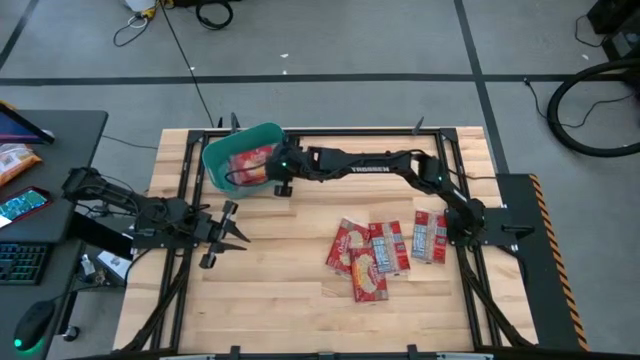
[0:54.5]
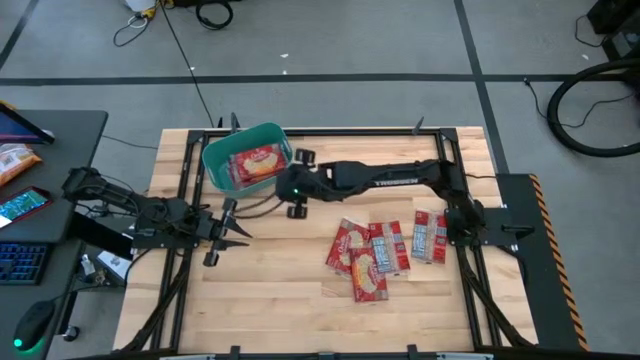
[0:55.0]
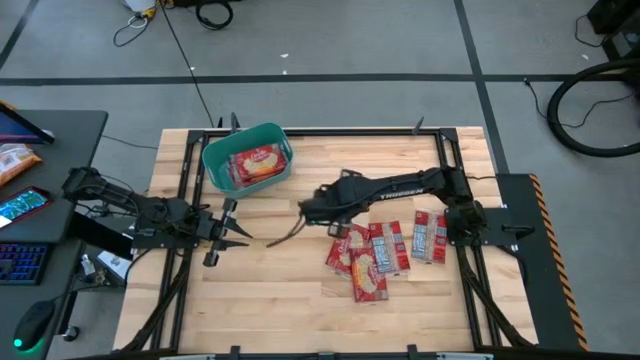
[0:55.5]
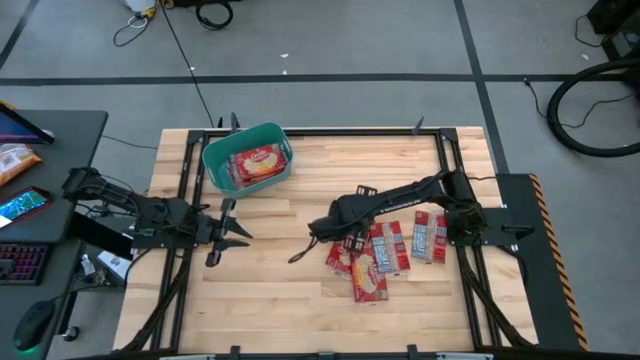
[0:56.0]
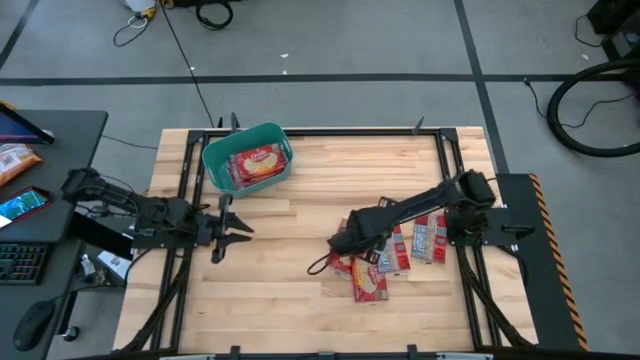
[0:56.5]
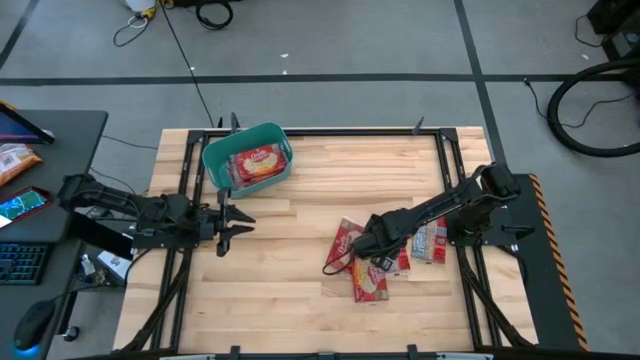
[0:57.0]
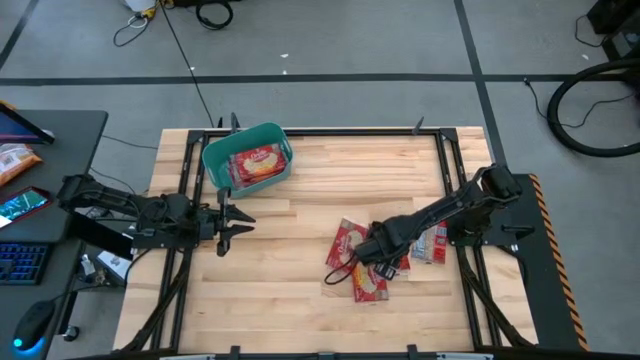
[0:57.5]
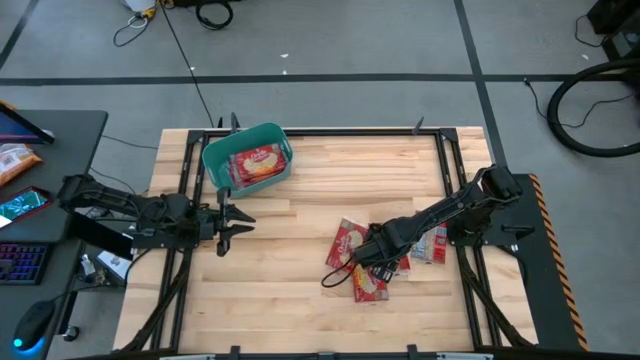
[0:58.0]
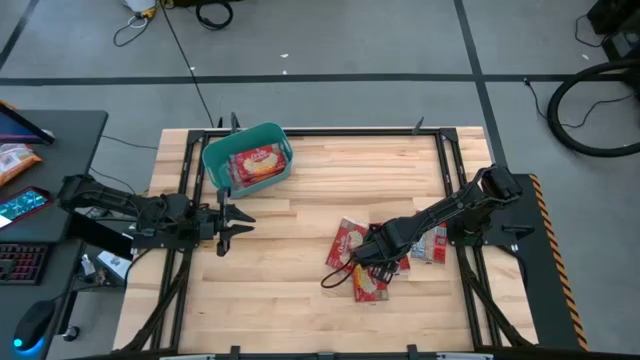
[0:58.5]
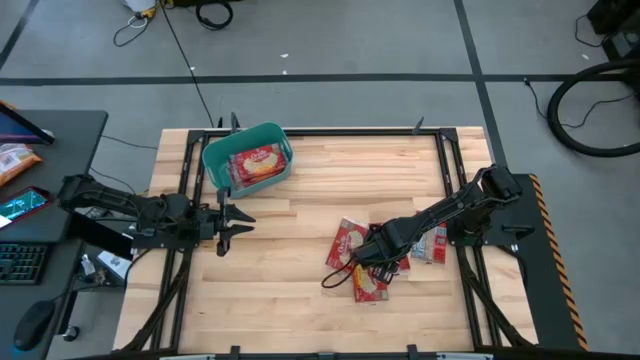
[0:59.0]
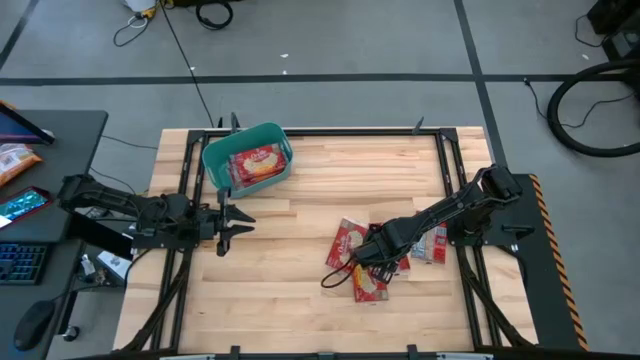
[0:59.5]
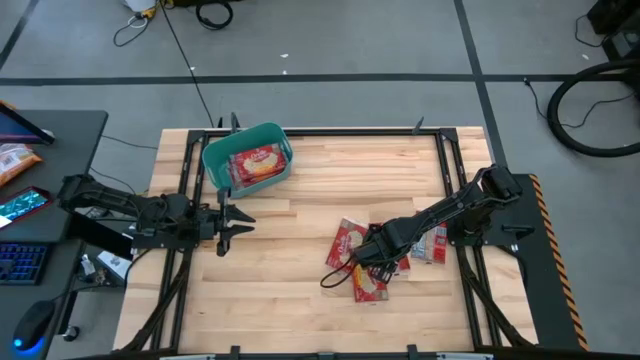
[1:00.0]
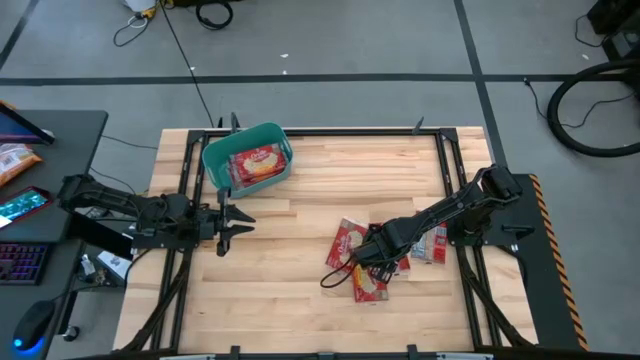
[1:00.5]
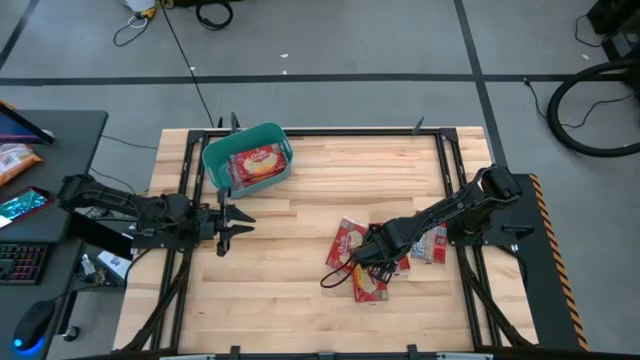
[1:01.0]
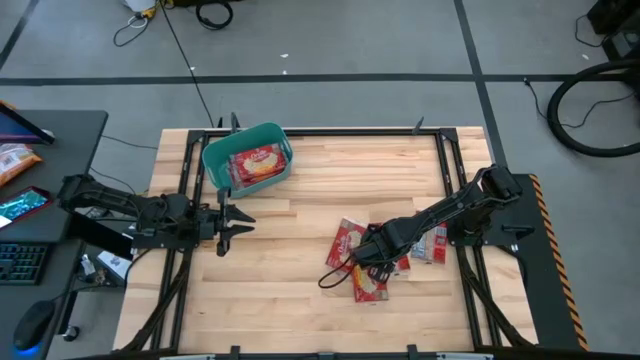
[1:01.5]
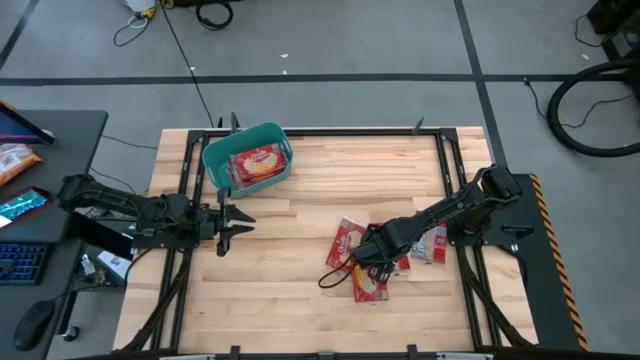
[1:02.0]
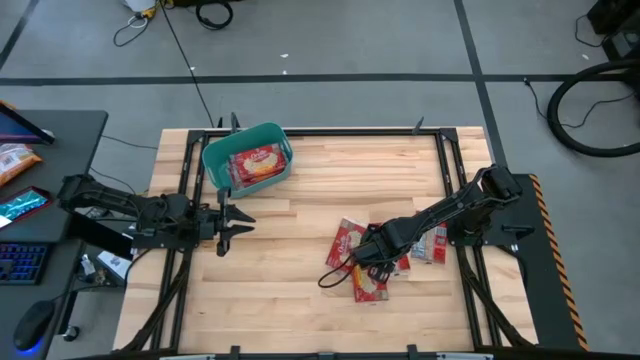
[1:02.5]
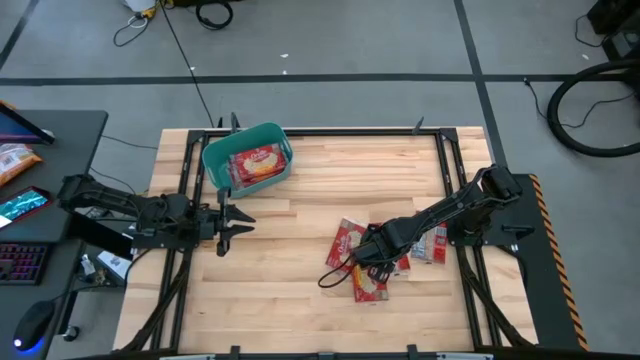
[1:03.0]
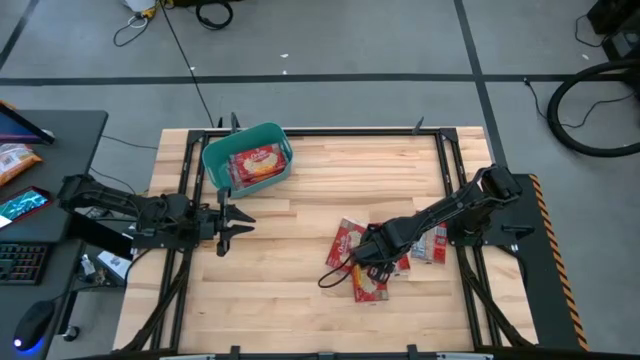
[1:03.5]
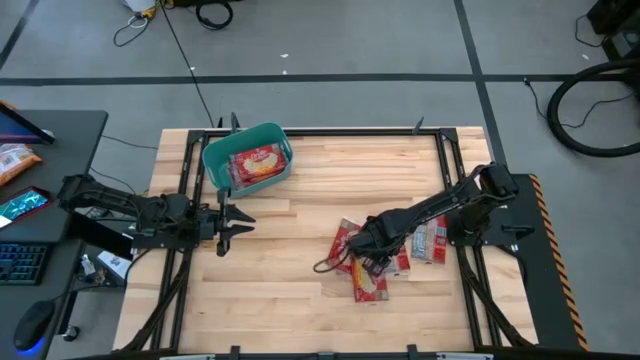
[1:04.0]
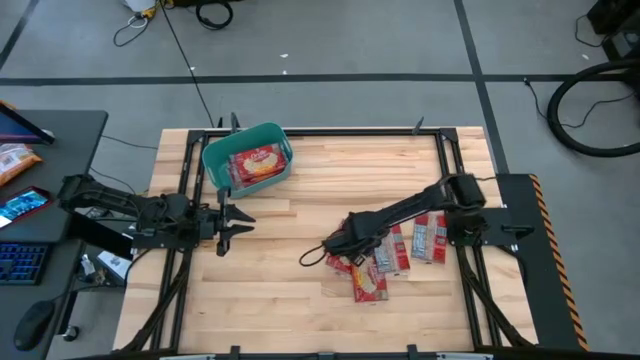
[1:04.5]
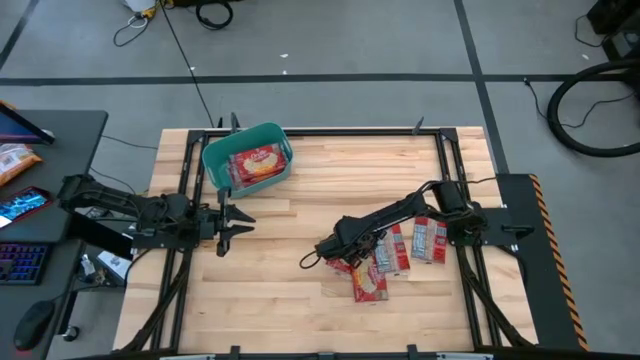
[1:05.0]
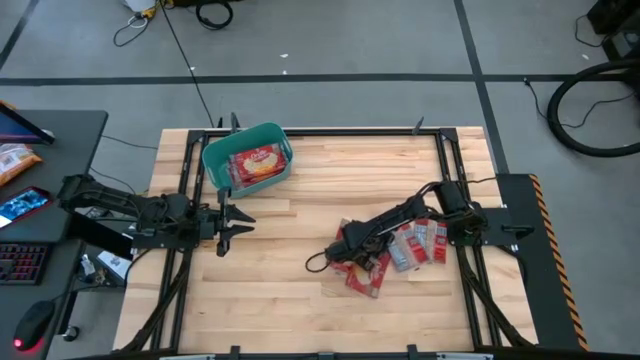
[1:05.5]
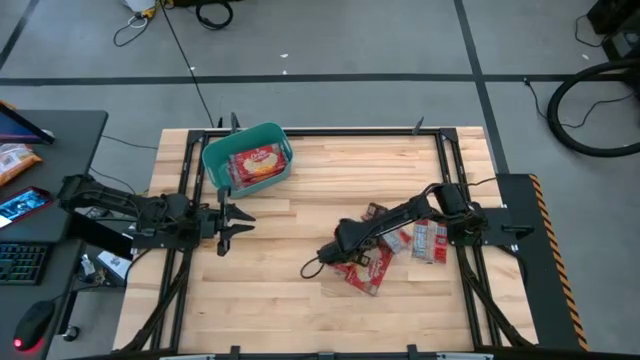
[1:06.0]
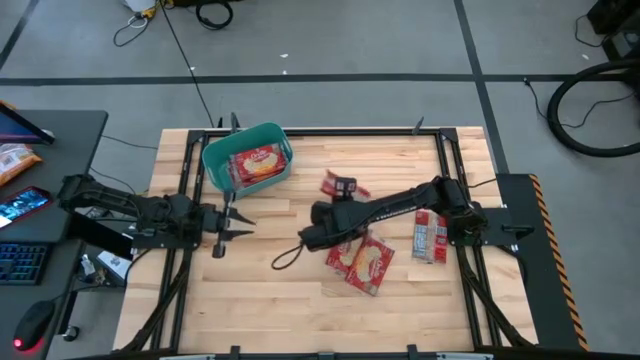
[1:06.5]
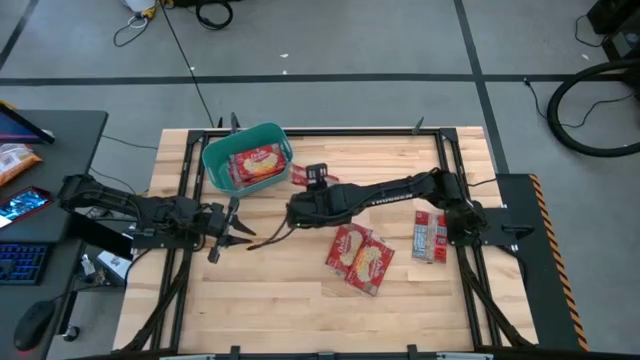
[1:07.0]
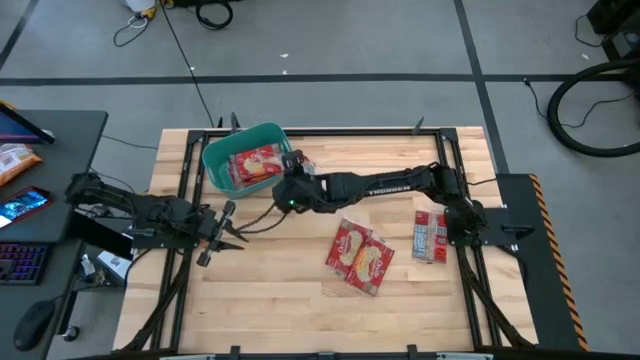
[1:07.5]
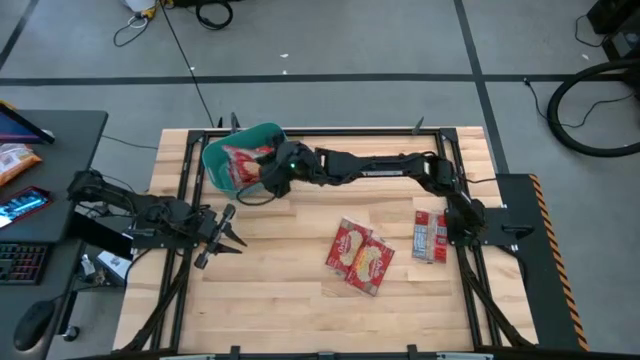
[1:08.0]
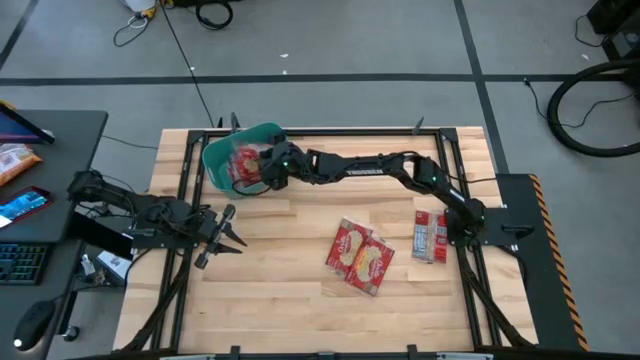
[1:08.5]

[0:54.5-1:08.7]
Task: Sort popcorn bags into baskets
Put the red popcorn bag into the green bin

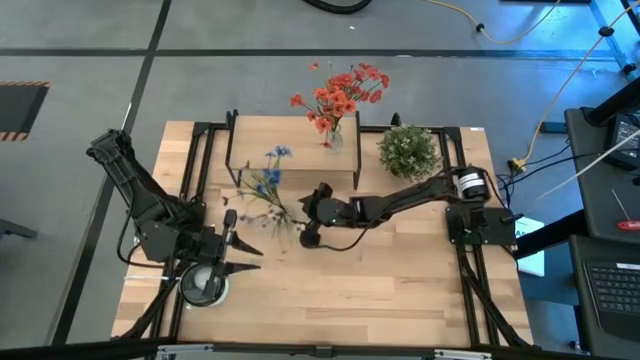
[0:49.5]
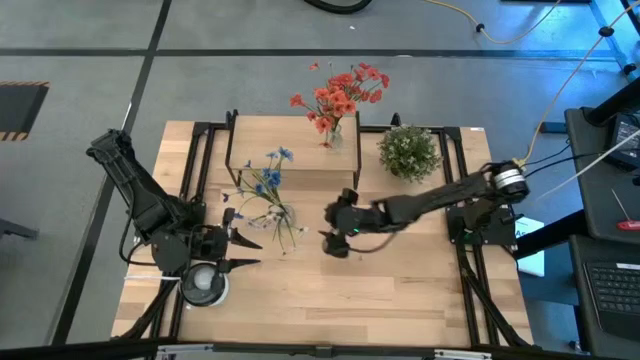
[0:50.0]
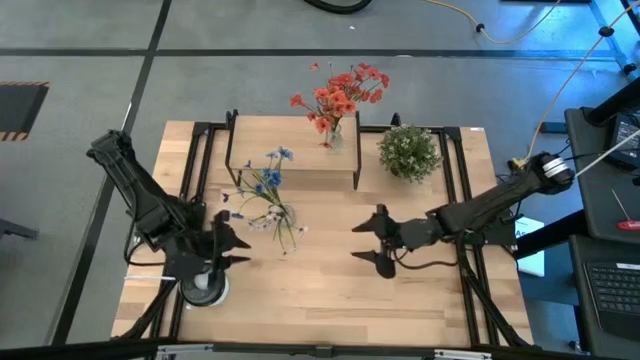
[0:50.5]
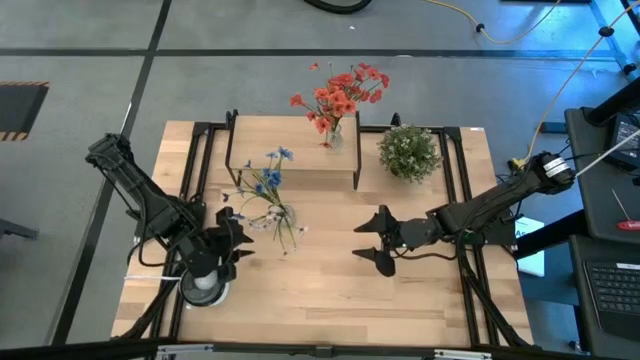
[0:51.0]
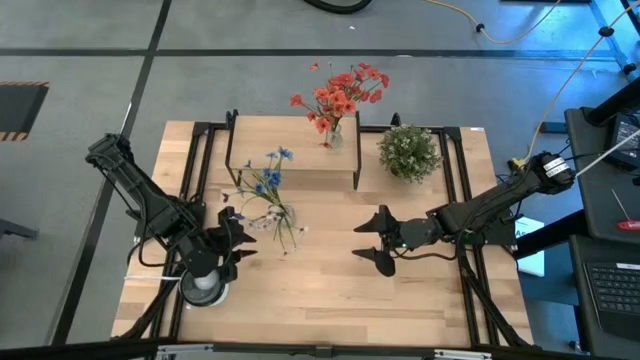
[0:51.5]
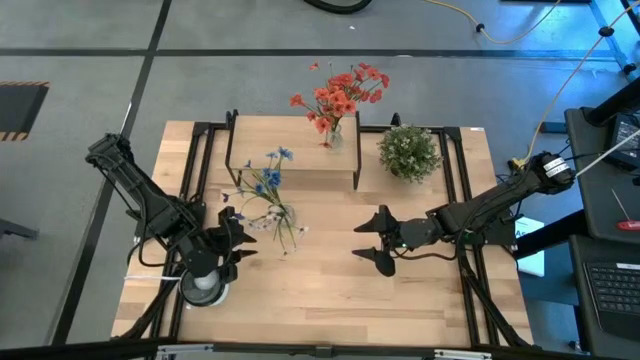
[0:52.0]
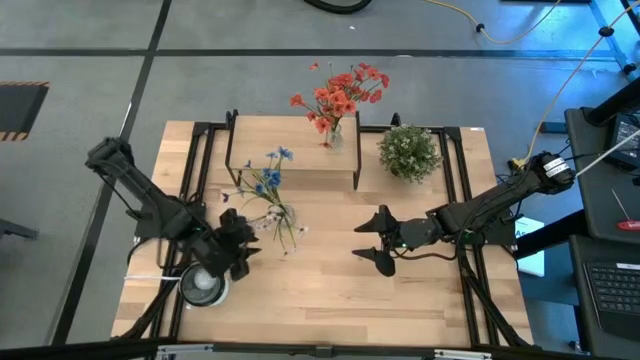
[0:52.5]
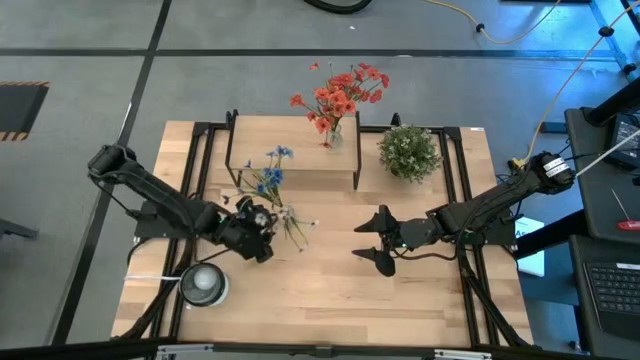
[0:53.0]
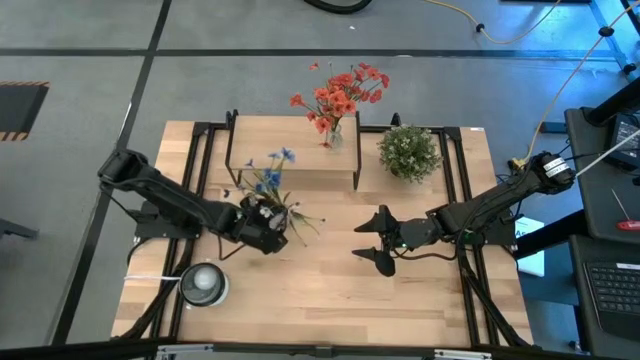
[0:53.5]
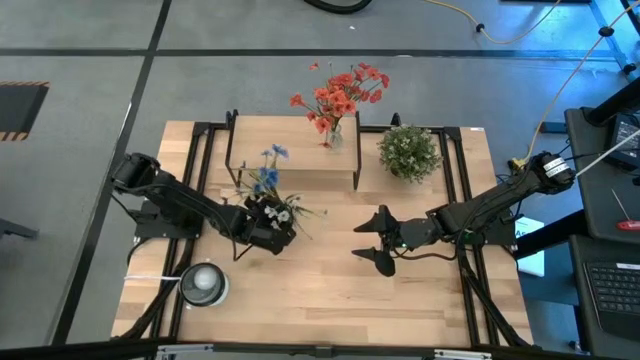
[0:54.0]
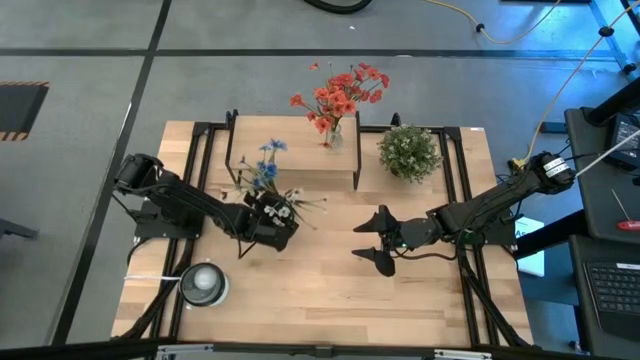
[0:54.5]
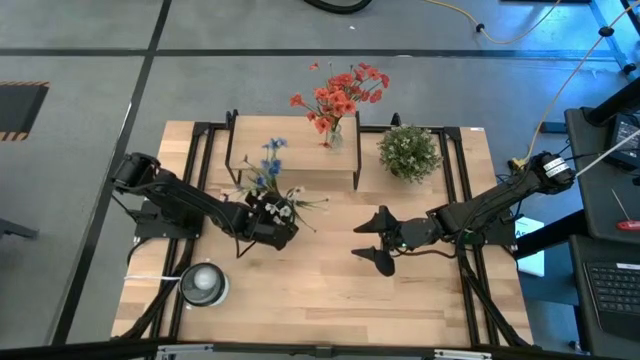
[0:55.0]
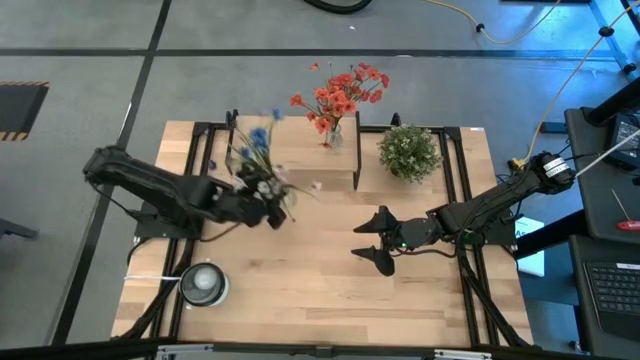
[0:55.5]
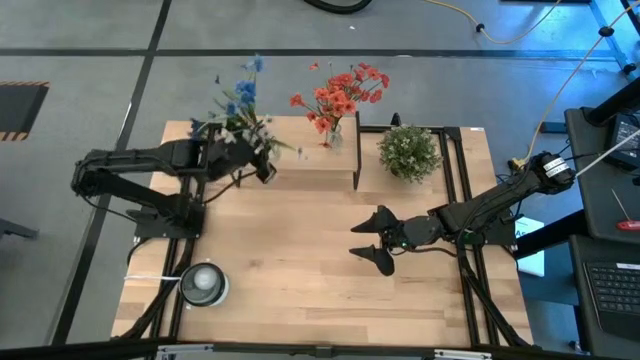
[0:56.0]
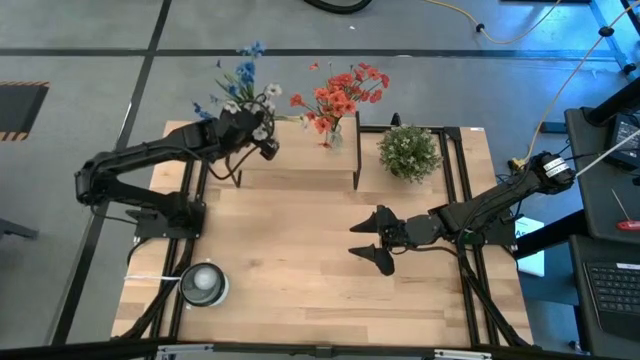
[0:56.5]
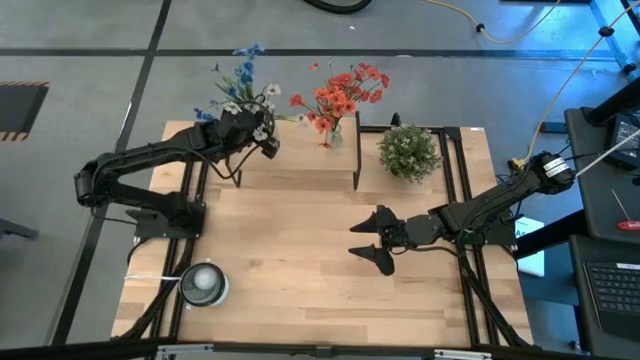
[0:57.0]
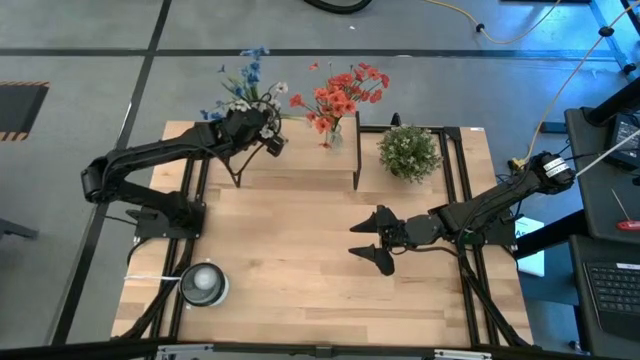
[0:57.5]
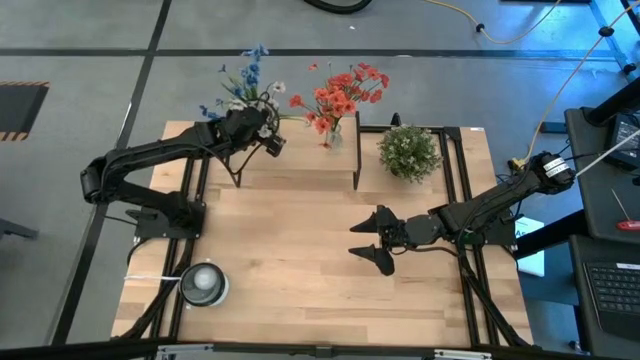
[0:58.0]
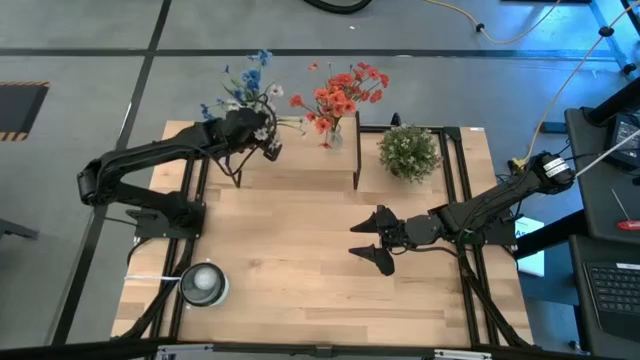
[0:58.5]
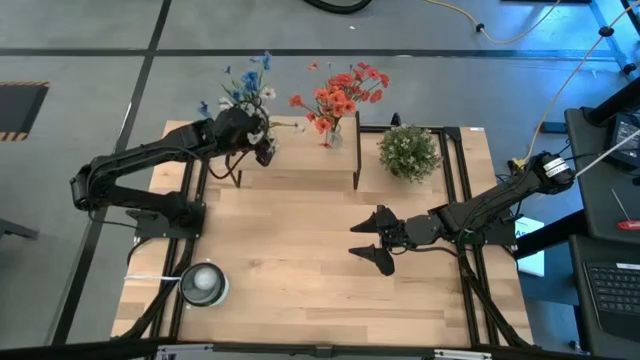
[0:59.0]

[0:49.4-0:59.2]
Task: Pick and place flowers into a vace then onto a shelf
Put the transparent vase with colored flowers on the shelf
